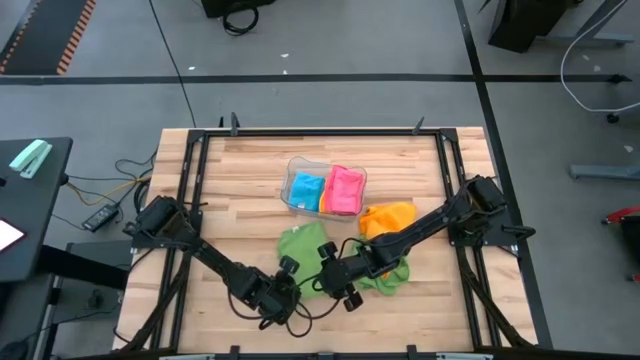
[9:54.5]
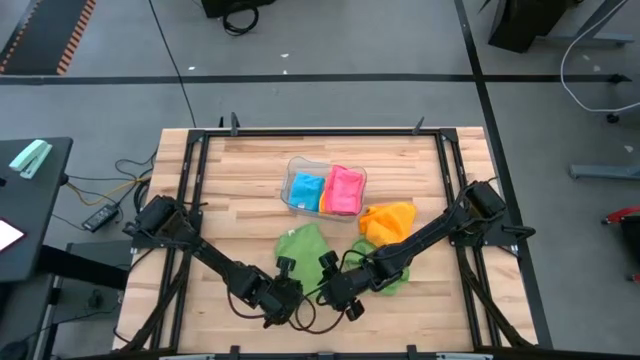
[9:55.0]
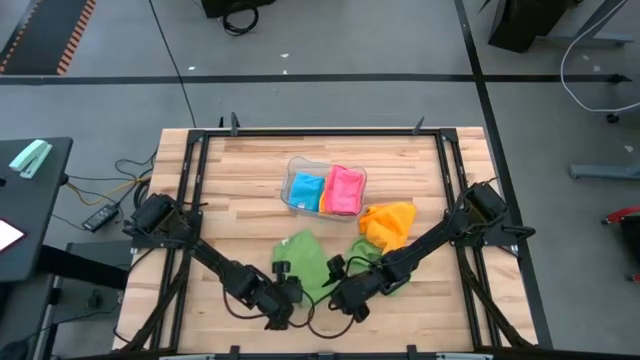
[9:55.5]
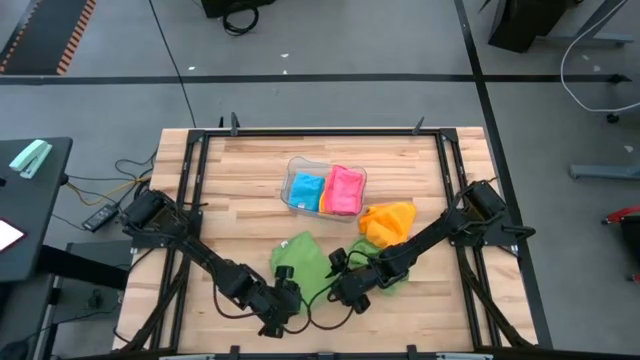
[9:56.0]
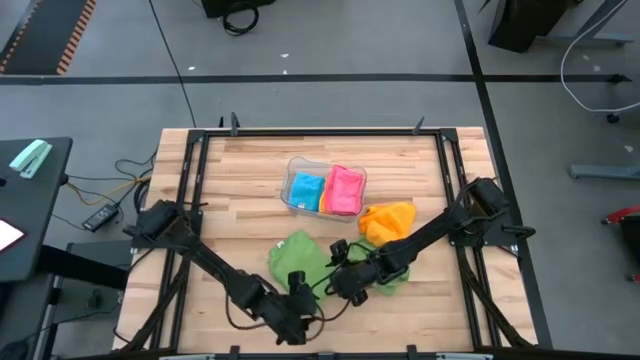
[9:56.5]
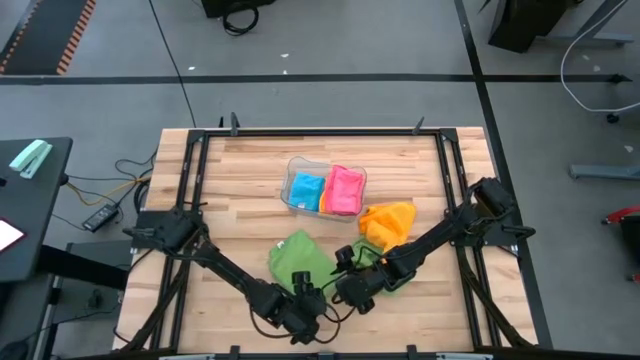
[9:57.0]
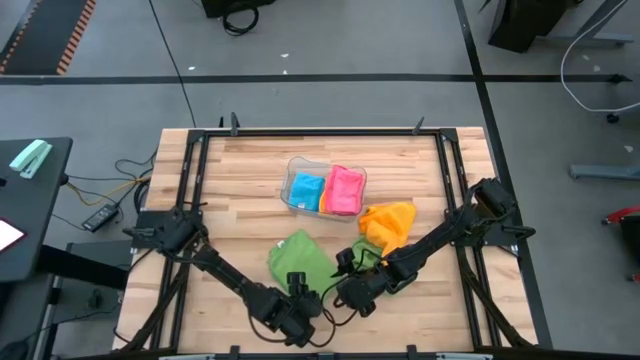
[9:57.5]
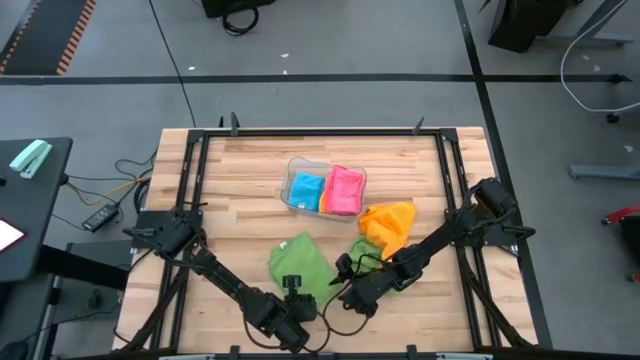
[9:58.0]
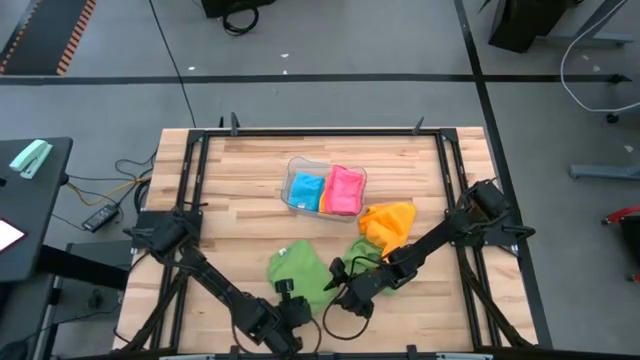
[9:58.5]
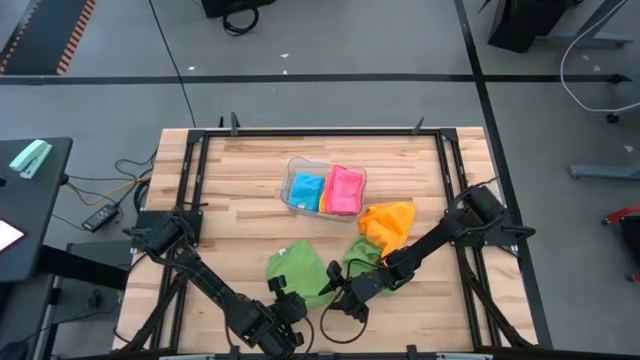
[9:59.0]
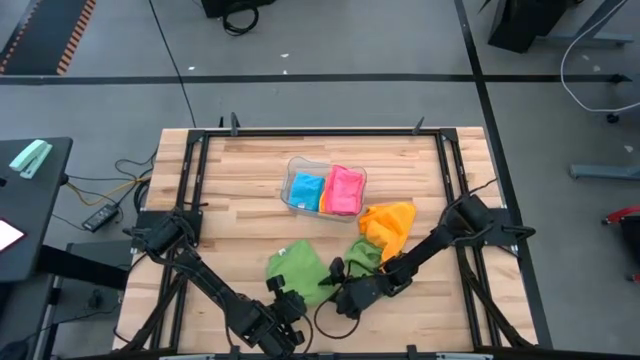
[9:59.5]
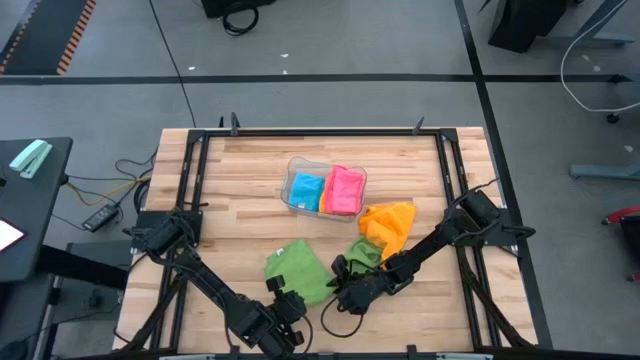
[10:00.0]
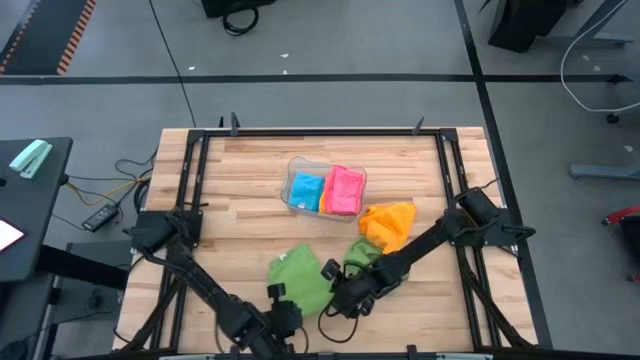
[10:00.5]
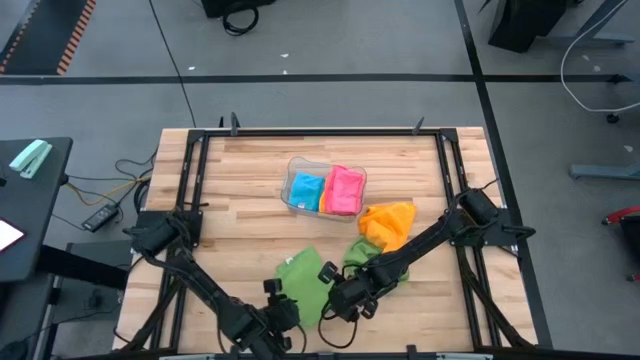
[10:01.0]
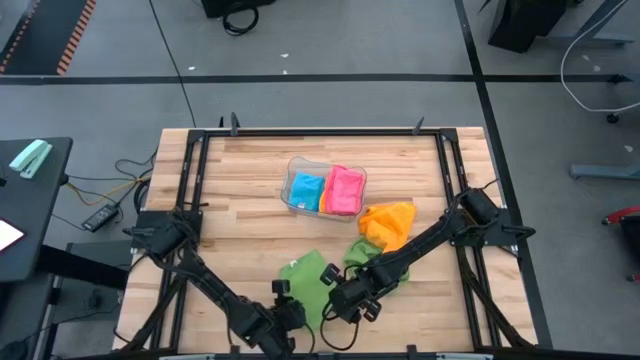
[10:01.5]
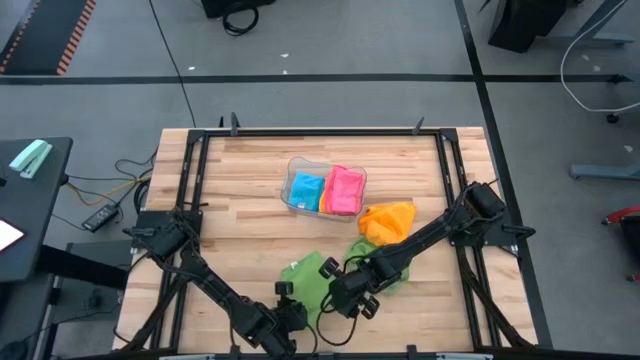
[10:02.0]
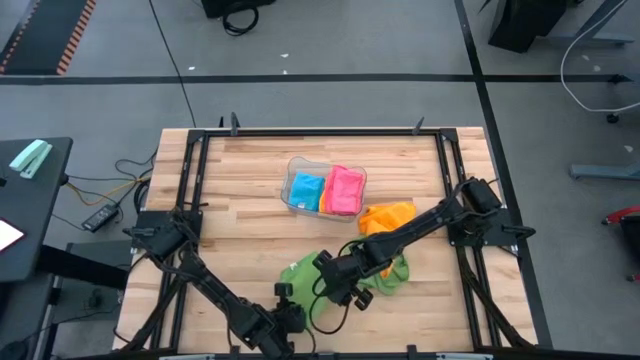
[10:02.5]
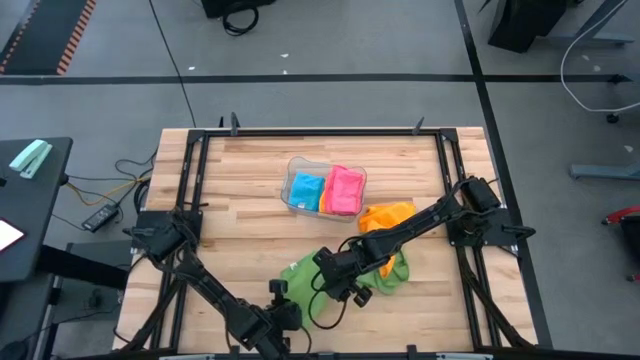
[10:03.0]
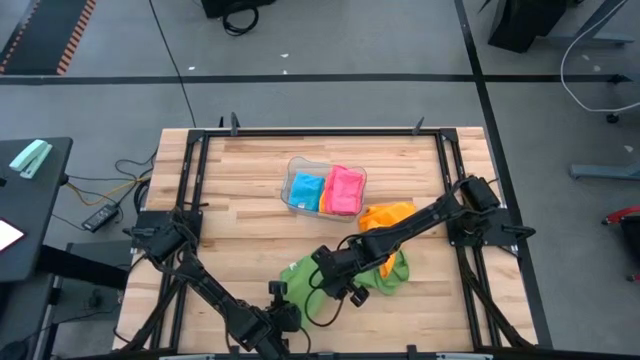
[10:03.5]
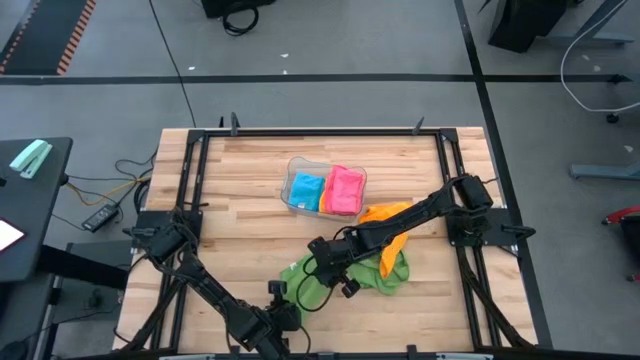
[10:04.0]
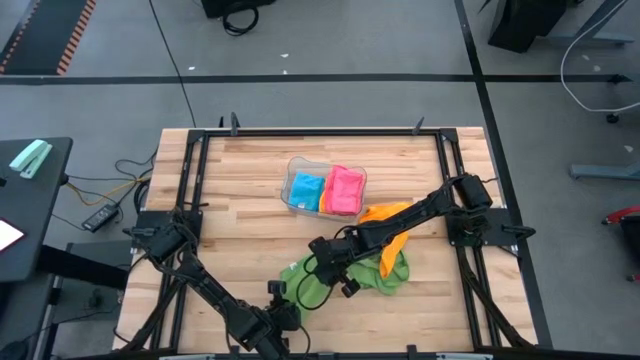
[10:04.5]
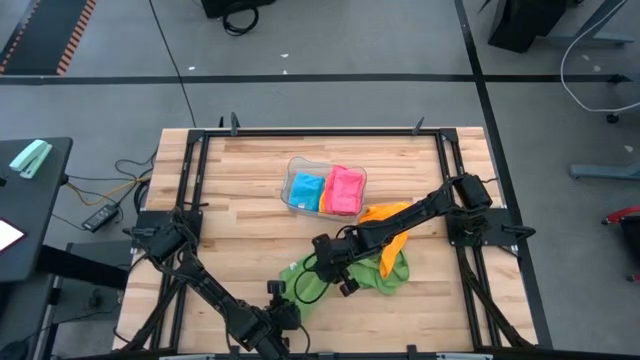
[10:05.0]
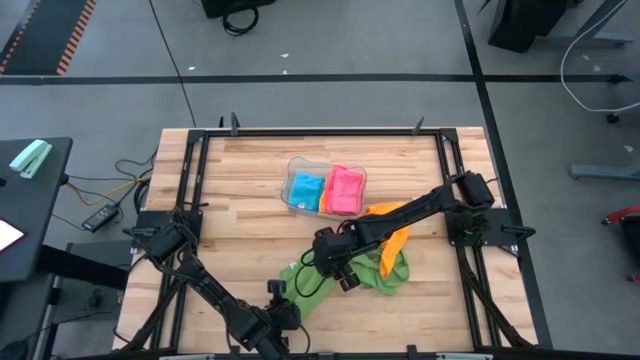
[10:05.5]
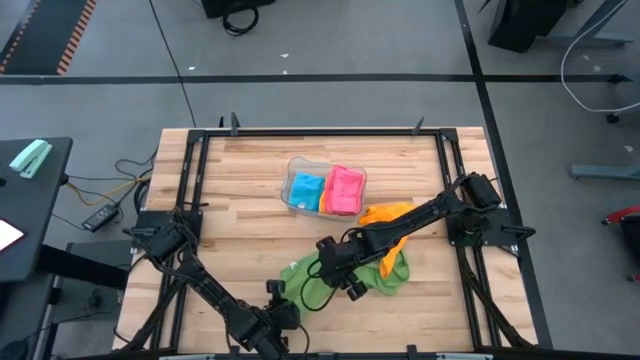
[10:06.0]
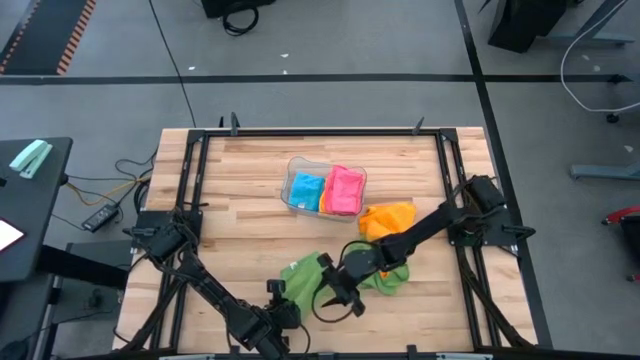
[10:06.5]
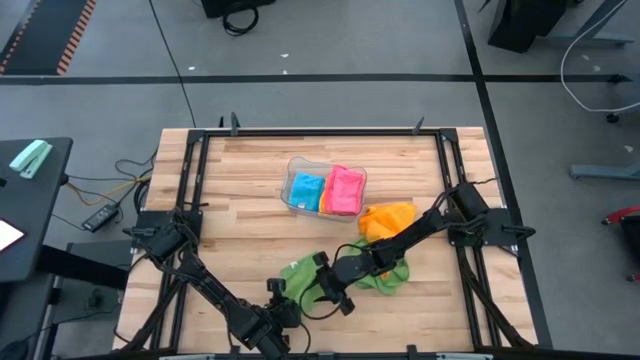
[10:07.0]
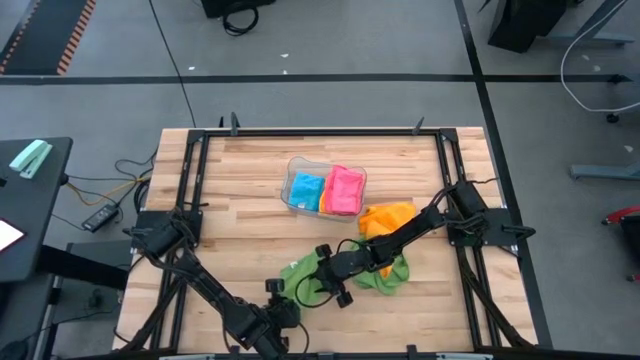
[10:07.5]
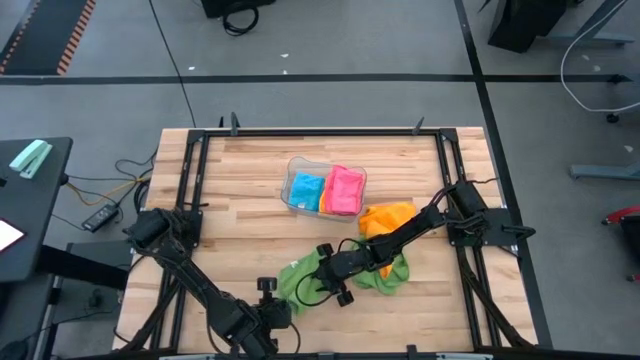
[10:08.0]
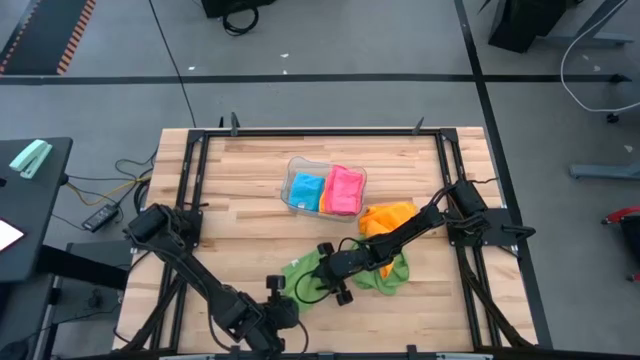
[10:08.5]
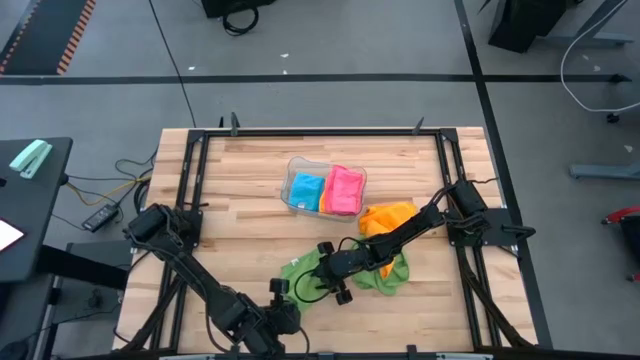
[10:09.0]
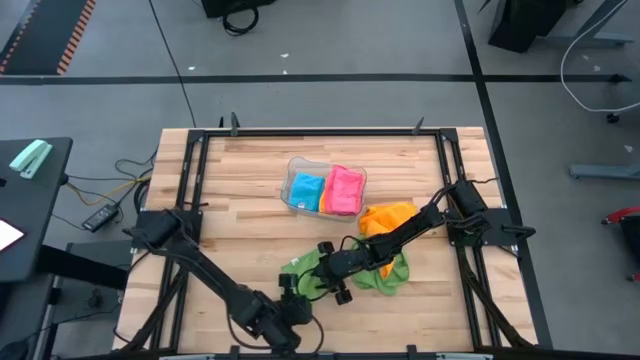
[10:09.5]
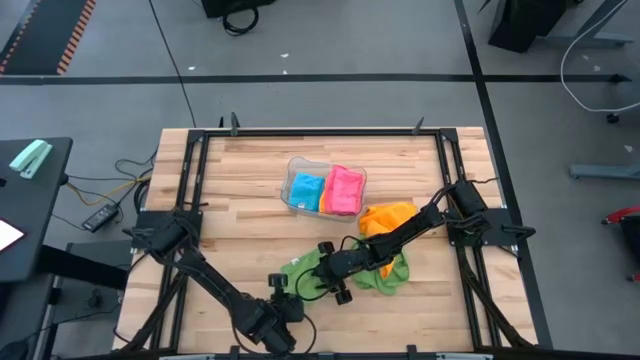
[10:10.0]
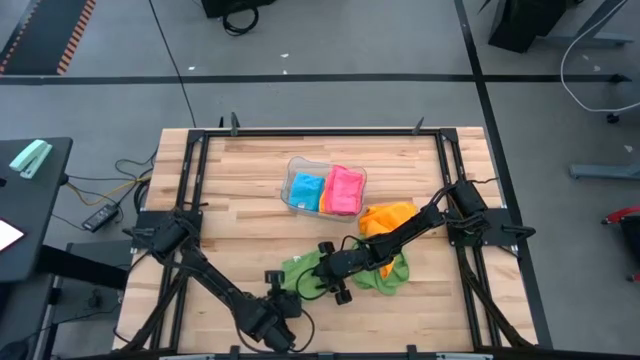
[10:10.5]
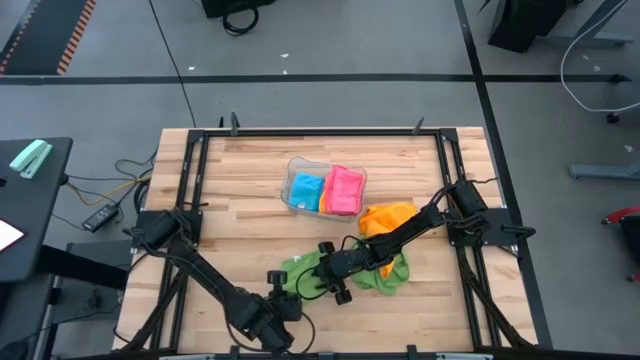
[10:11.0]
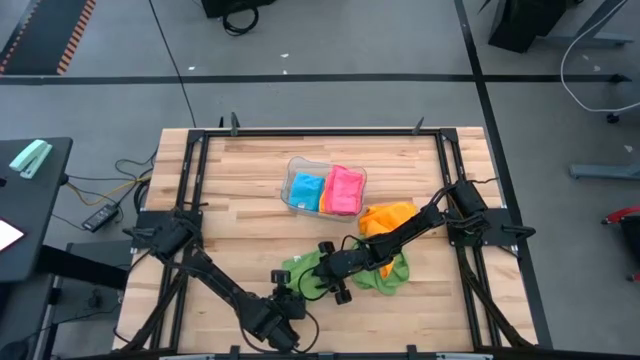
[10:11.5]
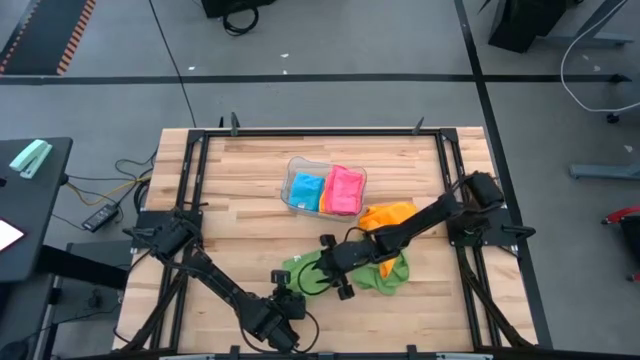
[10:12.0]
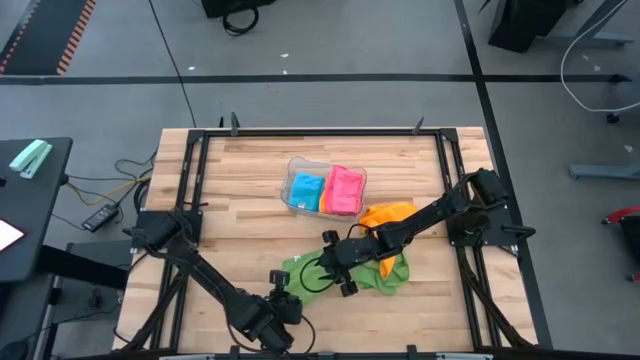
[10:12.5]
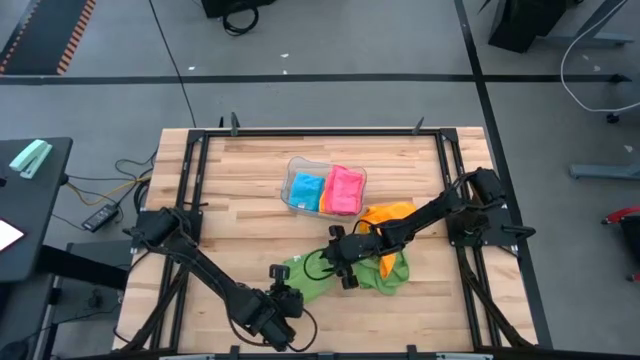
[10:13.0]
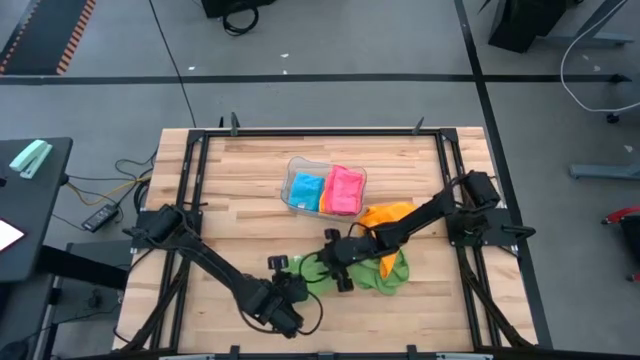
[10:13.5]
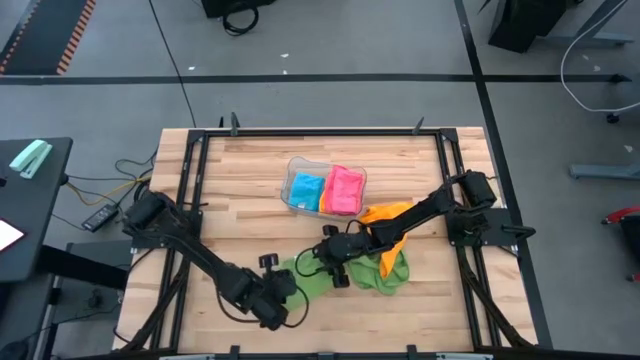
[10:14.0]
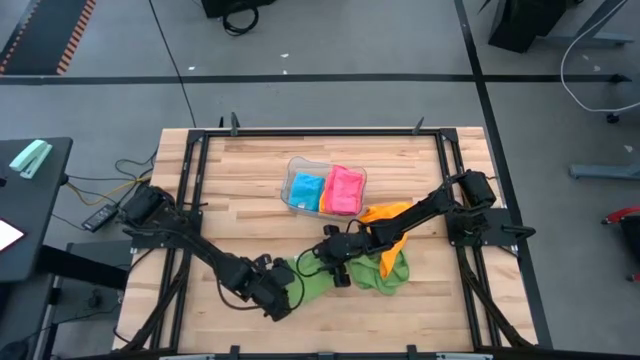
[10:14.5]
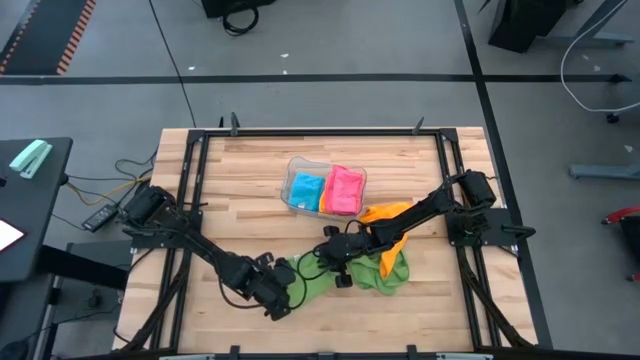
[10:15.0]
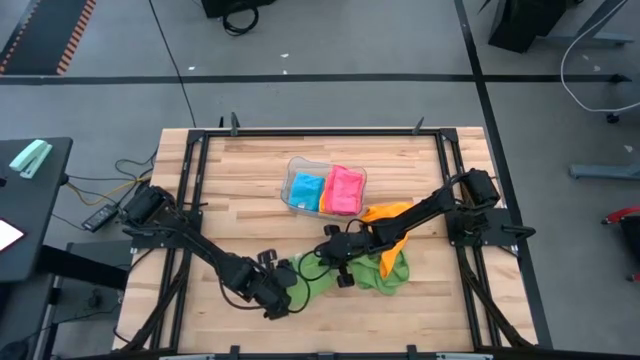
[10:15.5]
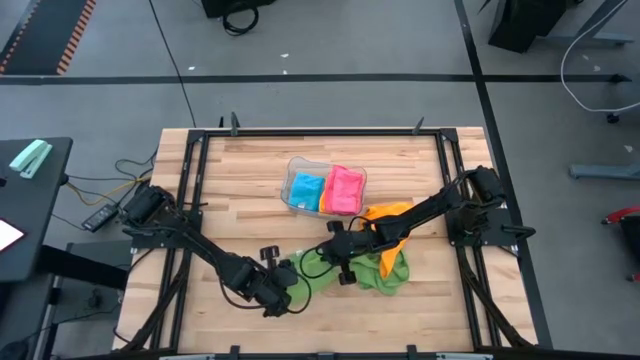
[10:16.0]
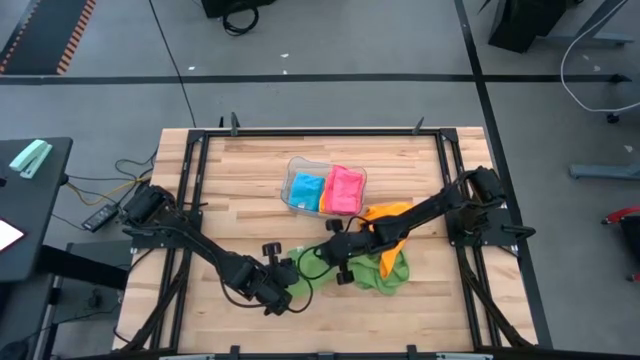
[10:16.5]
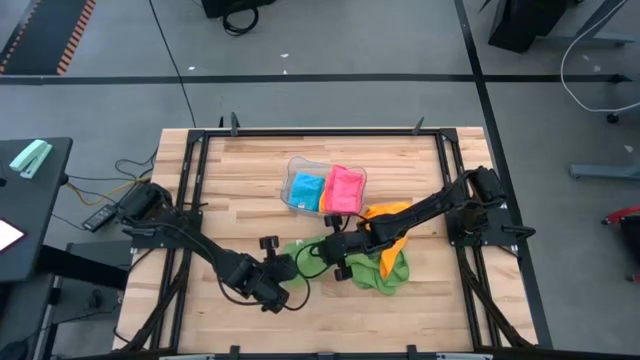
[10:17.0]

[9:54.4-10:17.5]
Task: Fold microfiber towels
Fold the top green microfiber cloth
